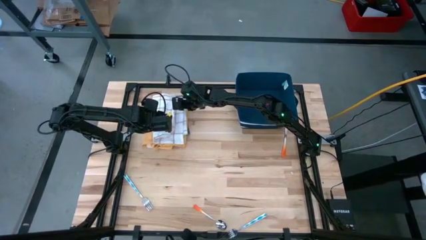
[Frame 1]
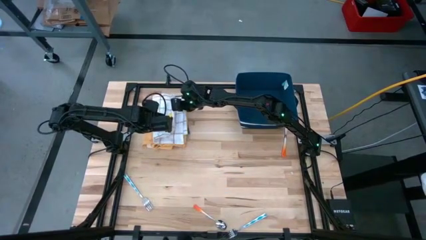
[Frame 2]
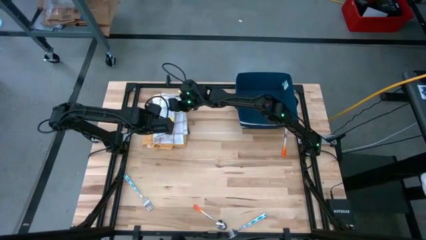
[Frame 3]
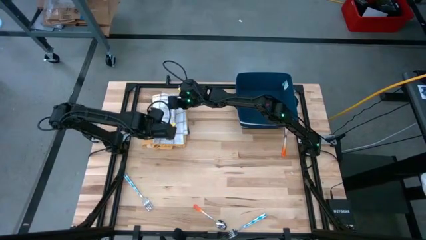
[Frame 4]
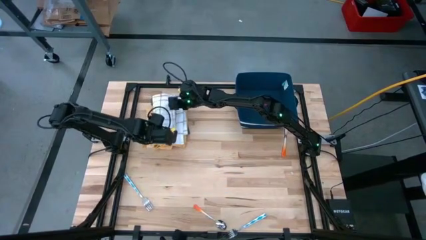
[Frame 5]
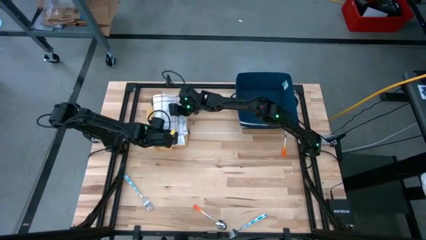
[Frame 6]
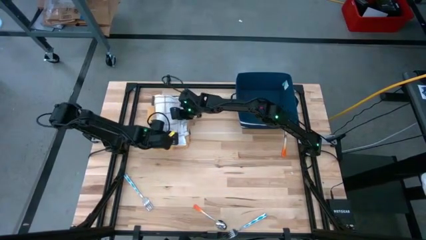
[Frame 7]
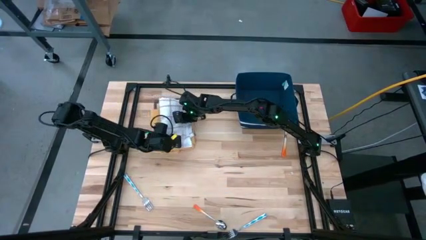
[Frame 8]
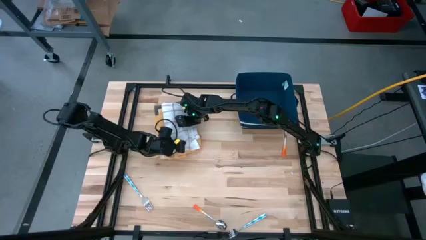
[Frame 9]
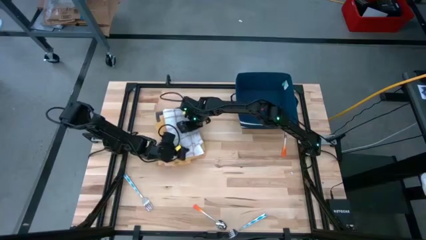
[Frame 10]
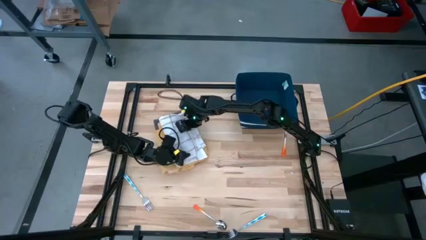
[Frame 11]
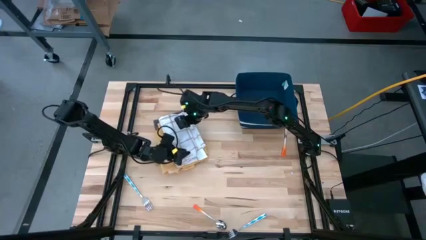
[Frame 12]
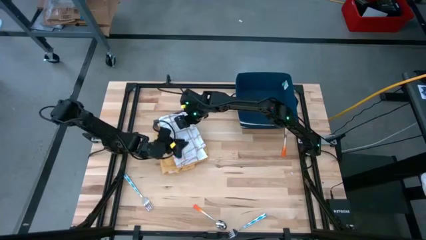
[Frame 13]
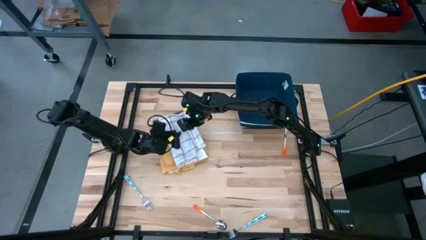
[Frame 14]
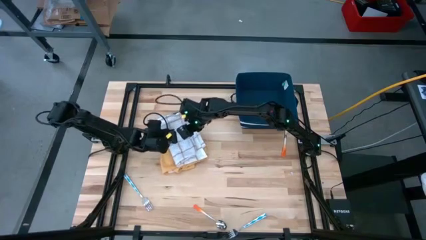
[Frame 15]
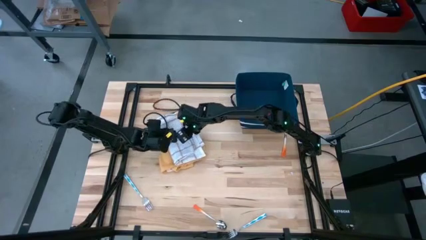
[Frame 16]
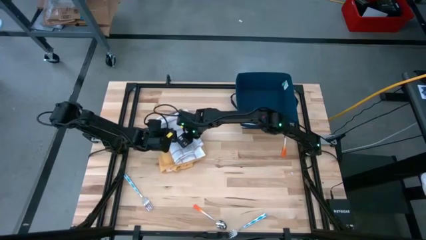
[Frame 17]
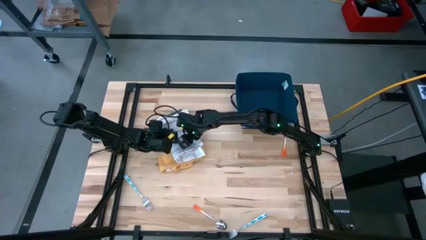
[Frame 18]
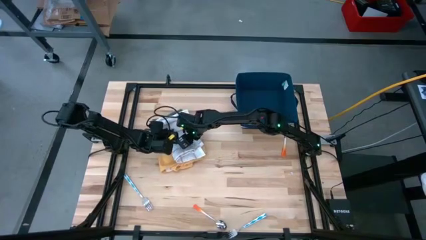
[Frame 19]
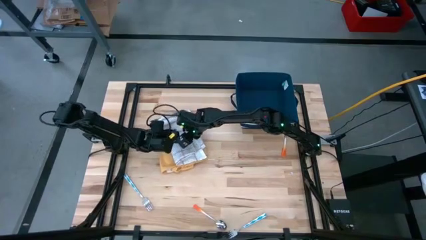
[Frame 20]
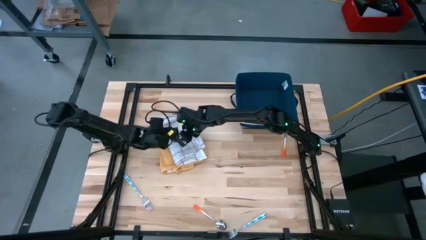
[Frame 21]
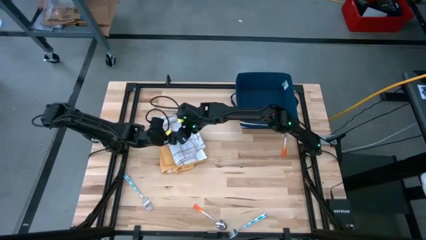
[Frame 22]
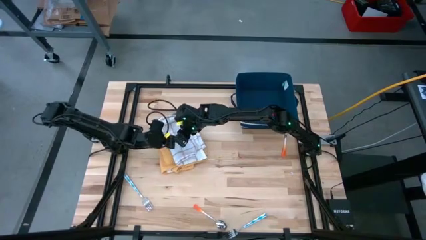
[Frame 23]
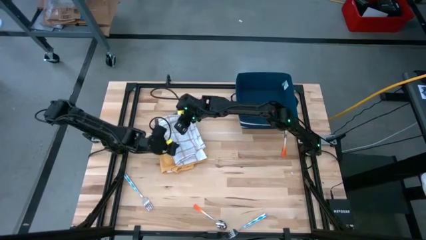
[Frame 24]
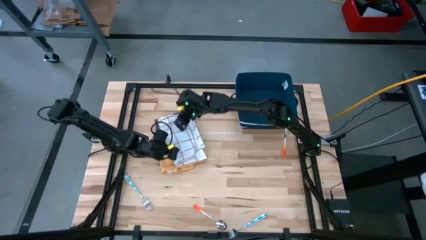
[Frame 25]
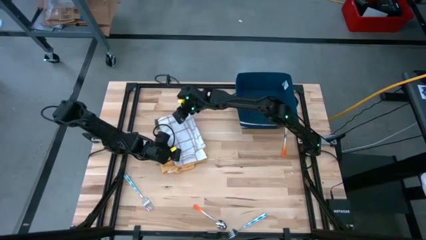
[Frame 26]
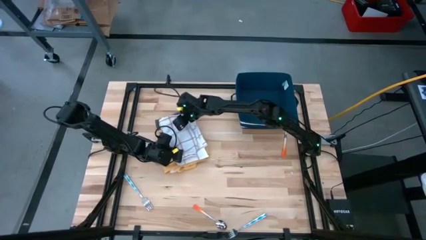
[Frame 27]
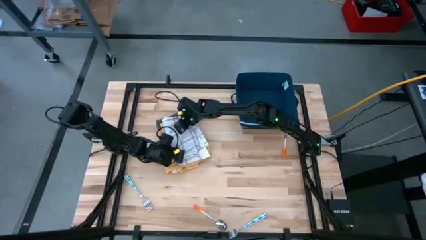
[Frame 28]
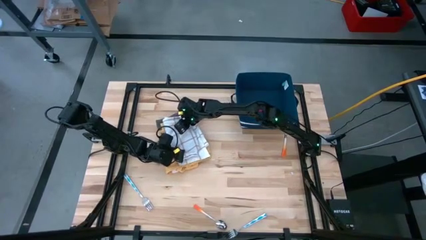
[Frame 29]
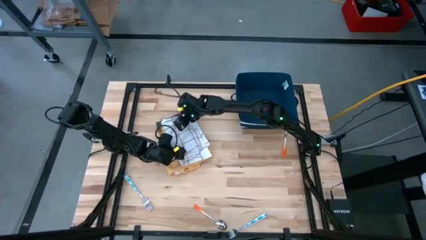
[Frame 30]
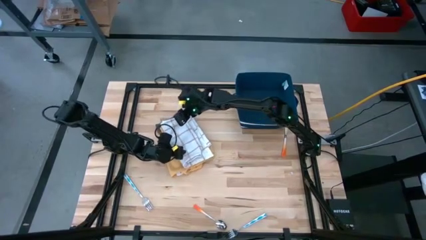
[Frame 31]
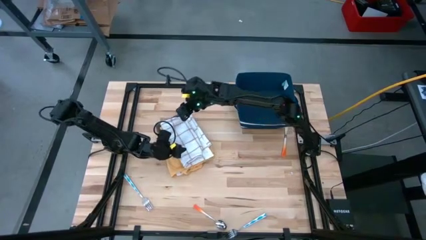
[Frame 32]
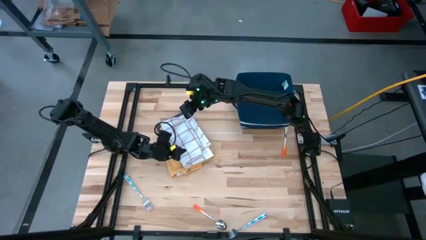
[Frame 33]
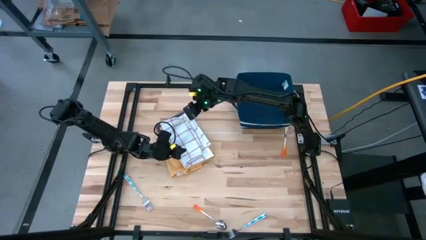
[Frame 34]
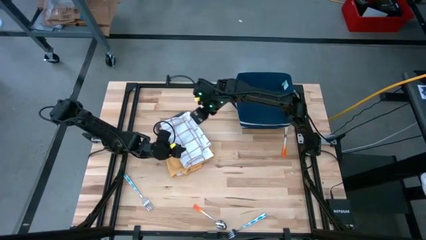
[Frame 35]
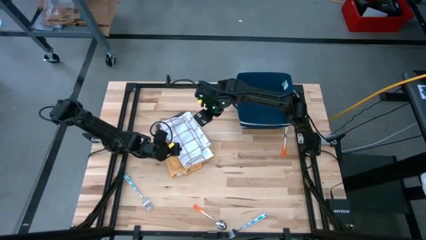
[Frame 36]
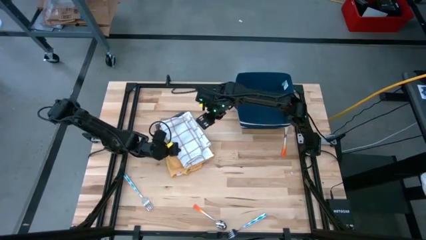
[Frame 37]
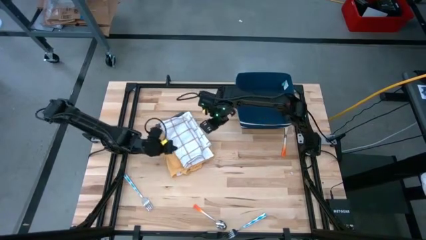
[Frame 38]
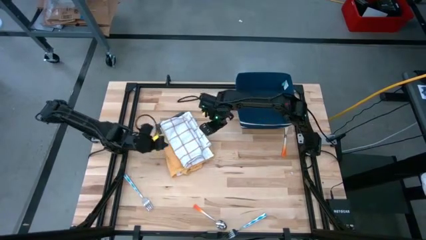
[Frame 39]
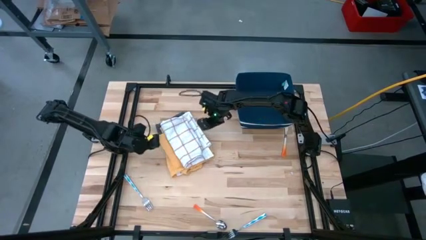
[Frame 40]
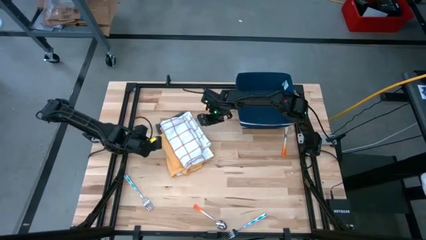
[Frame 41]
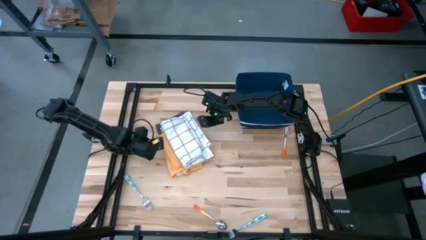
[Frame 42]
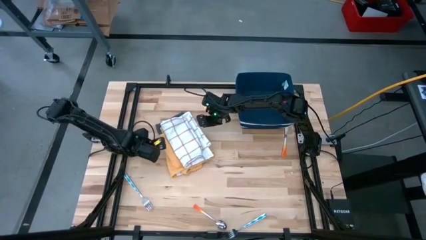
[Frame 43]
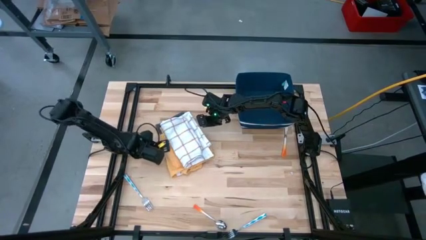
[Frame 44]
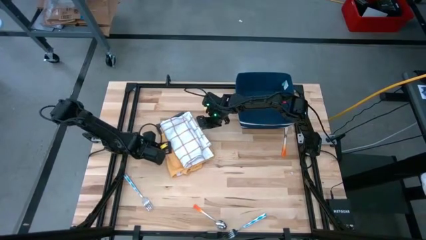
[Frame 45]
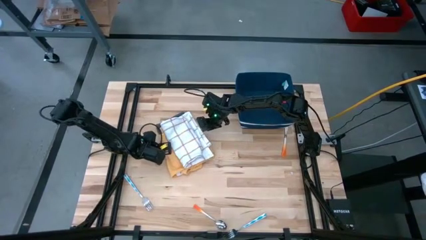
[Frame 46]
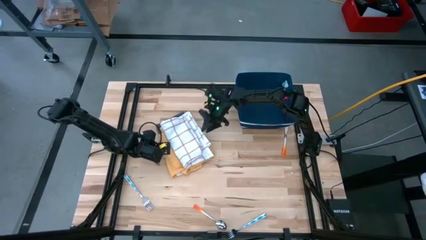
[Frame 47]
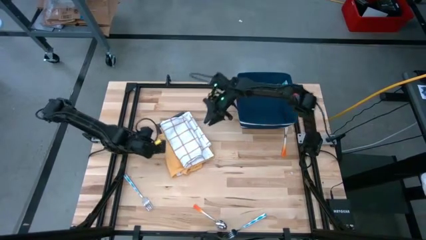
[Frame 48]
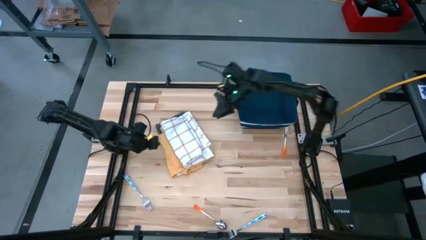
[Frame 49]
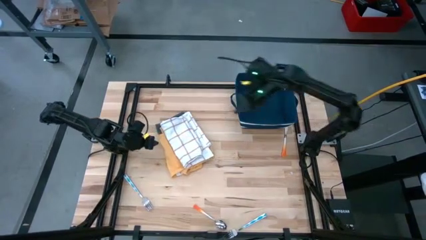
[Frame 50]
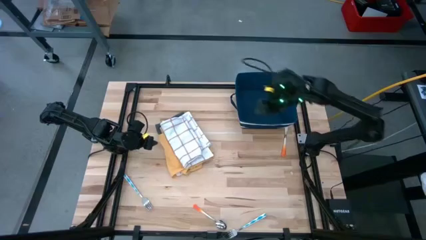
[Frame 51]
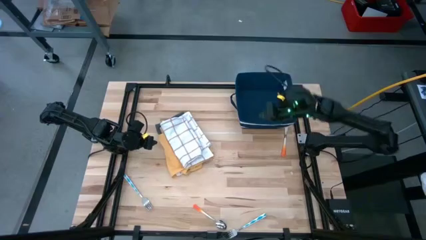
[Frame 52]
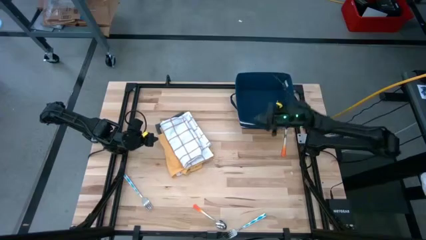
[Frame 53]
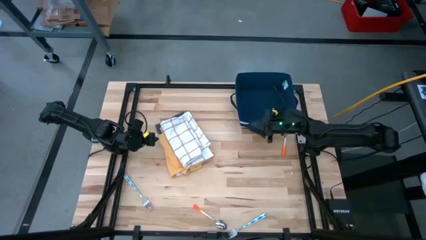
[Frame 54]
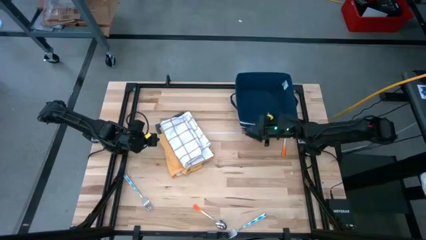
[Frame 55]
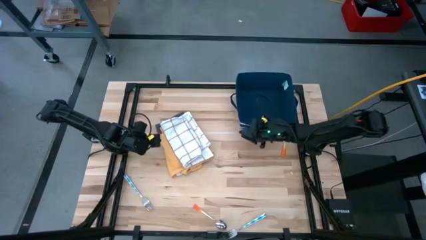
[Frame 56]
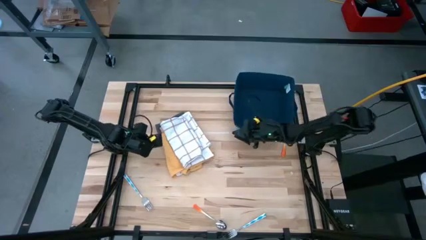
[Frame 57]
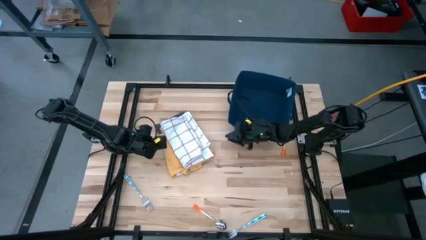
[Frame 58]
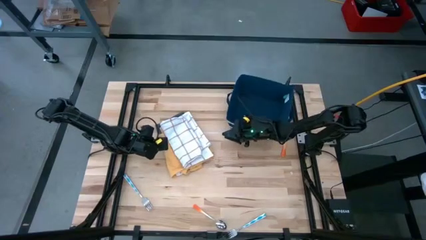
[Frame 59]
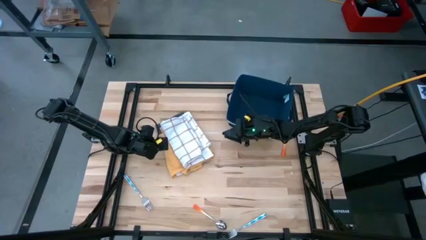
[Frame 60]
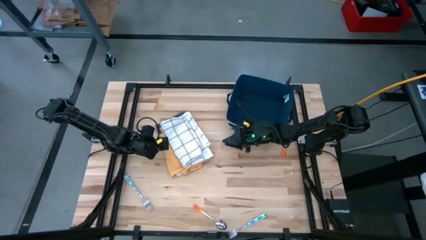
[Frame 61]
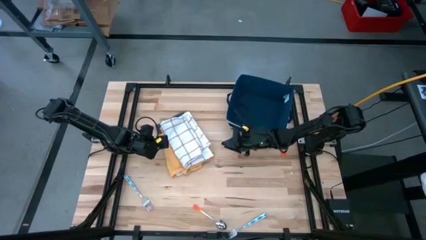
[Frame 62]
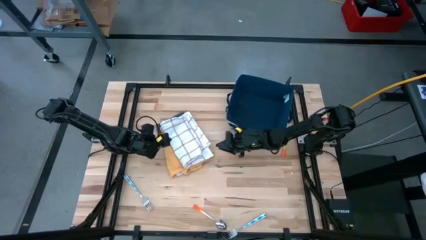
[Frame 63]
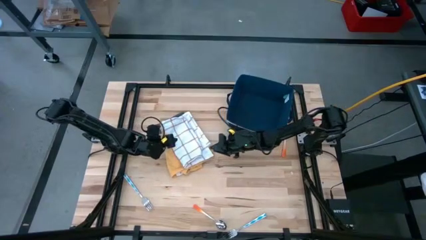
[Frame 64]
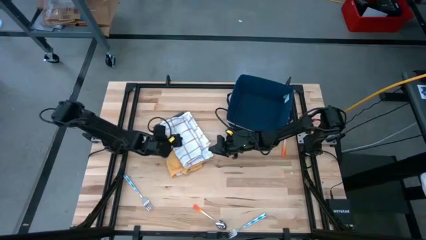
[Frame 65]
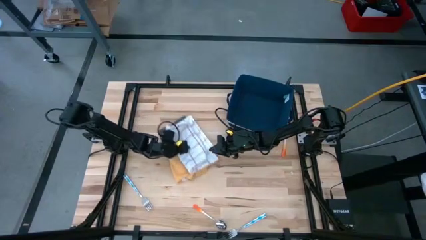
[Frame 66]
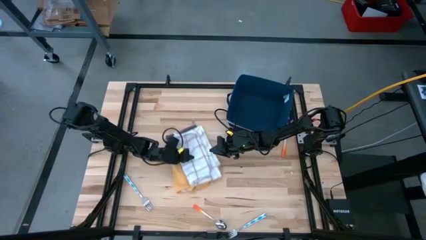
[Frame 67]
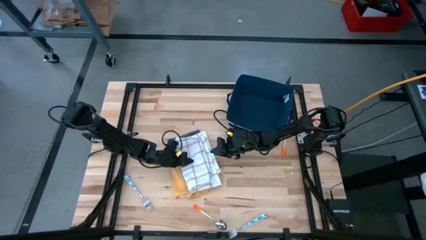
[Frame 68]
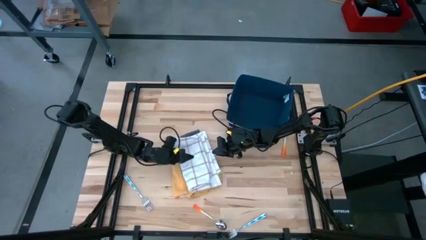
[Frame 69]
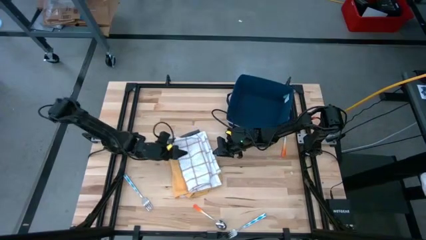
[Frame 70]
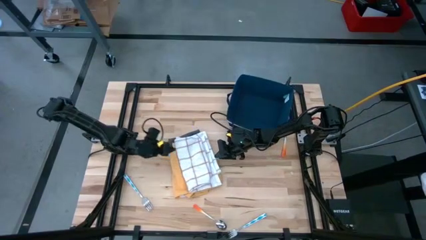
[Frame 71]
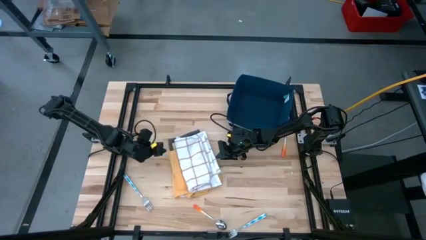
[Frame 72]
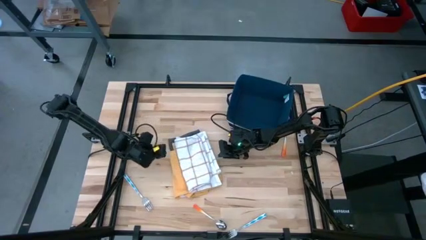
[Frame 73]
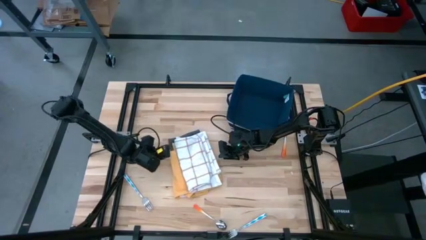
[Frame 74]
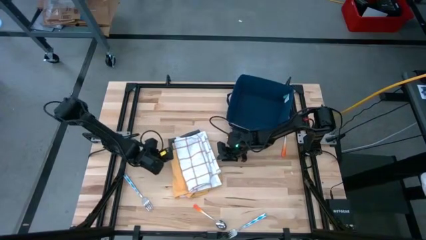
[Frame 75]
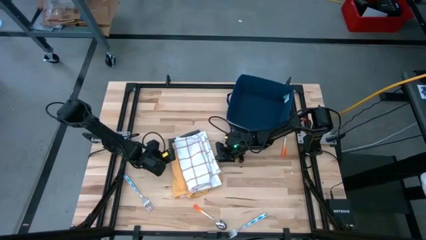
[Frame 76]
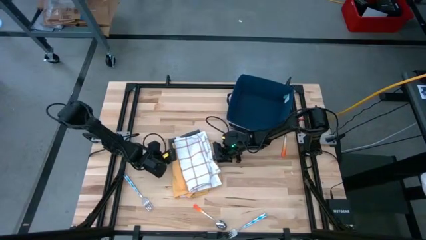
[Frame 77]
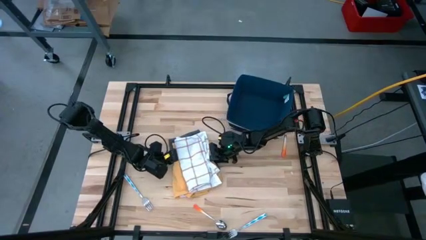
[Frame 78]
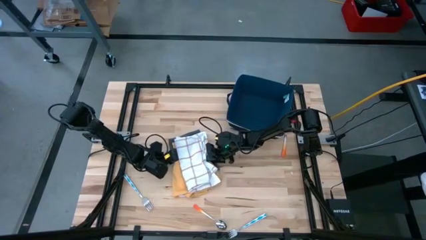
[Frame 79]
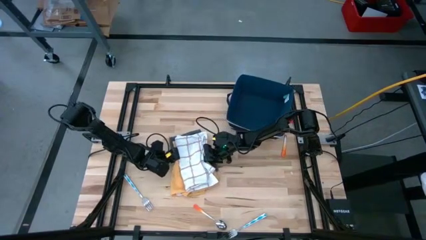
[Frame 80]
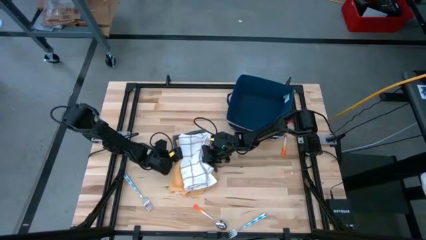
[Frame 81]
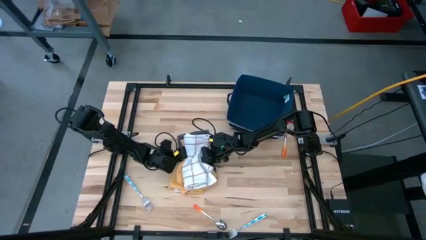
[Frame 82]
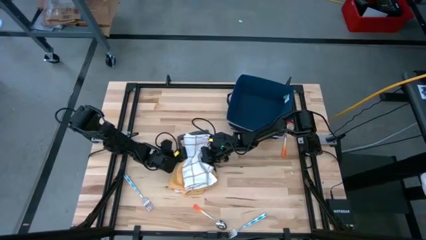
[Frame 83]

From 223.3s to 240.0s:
Task: Fold towel
Put the stacked towels into the blue bin
